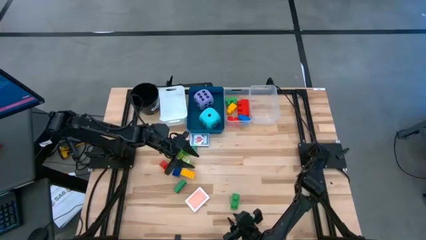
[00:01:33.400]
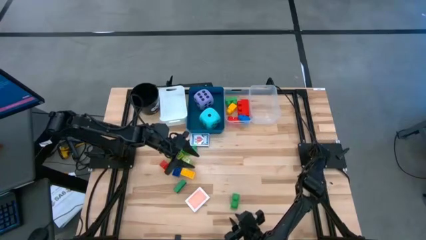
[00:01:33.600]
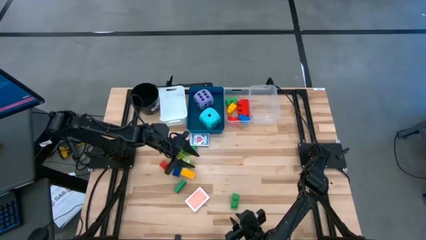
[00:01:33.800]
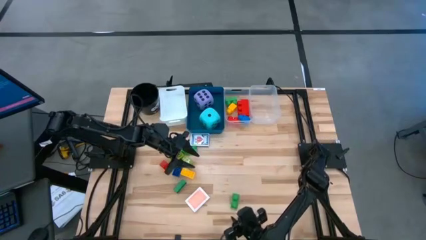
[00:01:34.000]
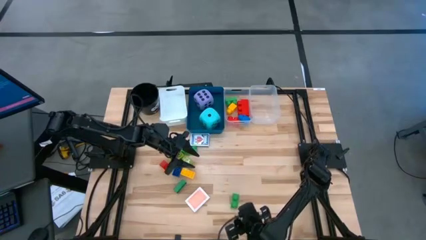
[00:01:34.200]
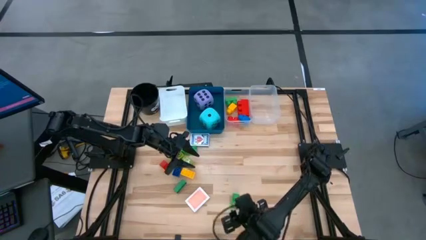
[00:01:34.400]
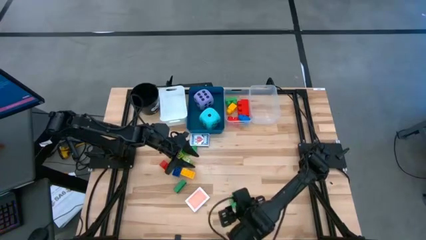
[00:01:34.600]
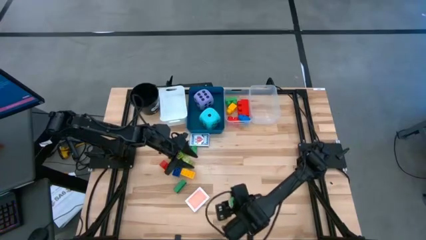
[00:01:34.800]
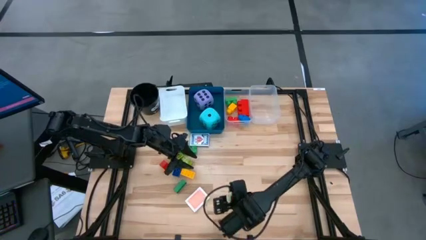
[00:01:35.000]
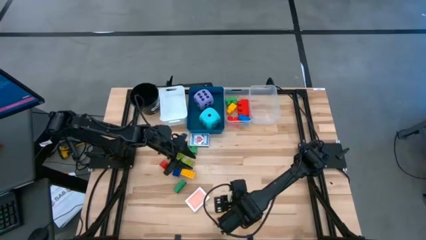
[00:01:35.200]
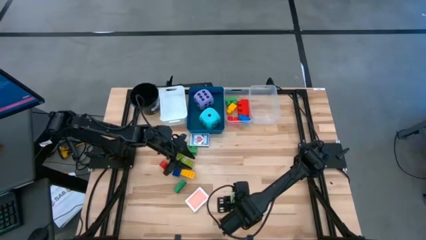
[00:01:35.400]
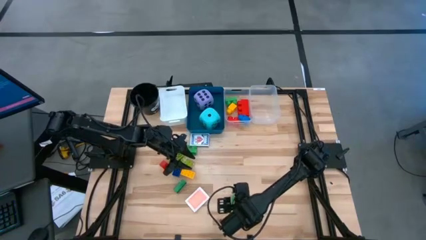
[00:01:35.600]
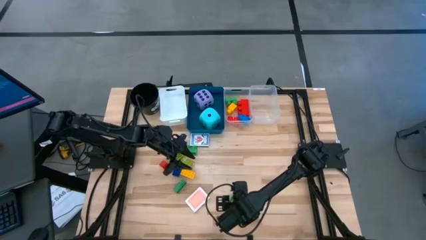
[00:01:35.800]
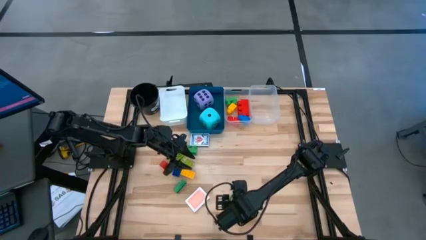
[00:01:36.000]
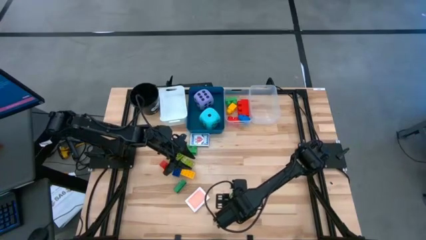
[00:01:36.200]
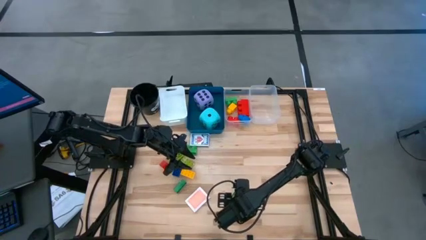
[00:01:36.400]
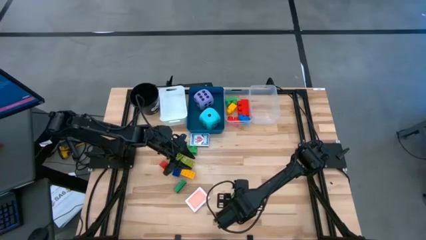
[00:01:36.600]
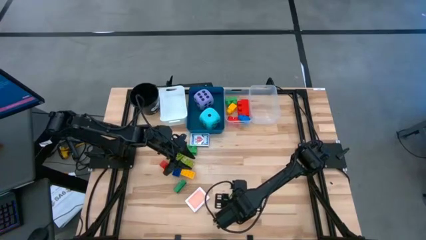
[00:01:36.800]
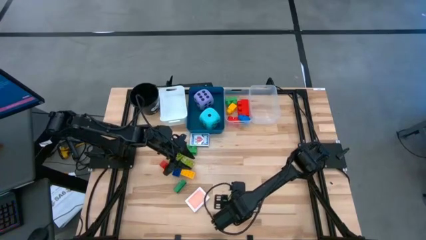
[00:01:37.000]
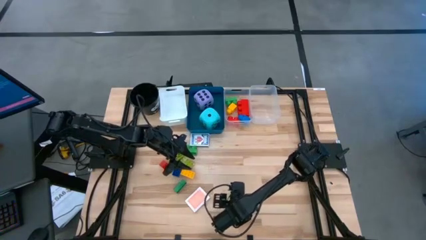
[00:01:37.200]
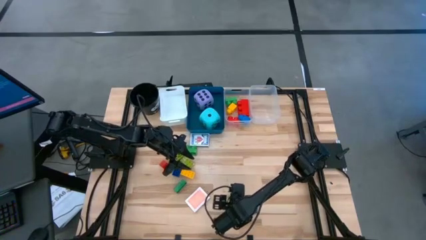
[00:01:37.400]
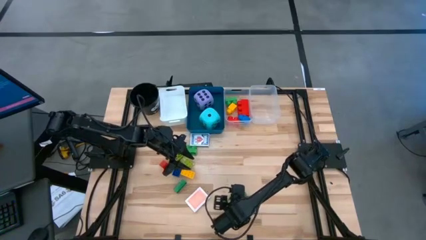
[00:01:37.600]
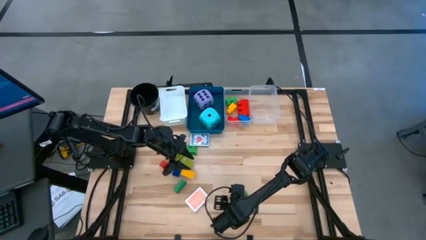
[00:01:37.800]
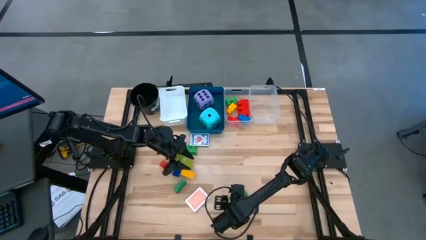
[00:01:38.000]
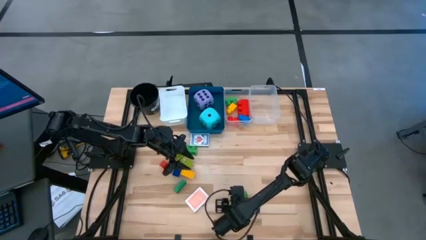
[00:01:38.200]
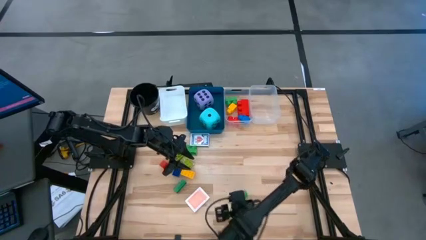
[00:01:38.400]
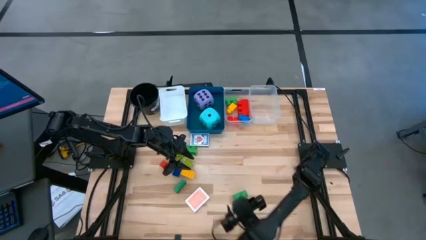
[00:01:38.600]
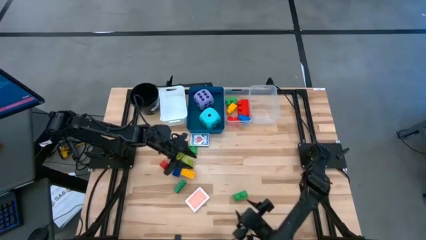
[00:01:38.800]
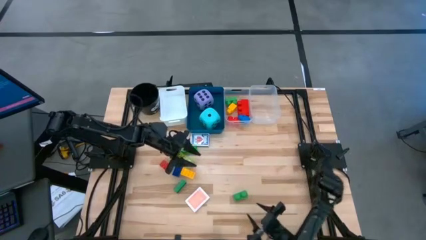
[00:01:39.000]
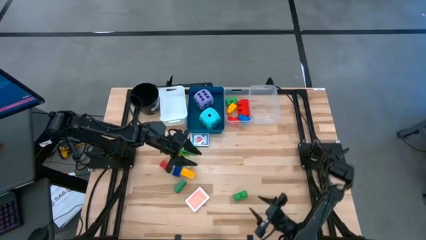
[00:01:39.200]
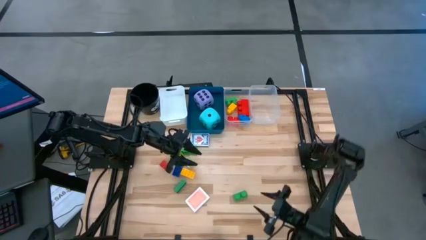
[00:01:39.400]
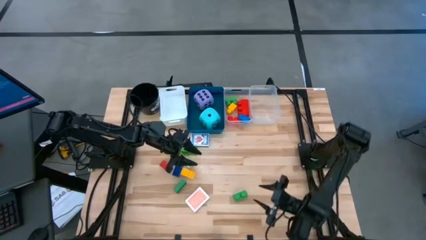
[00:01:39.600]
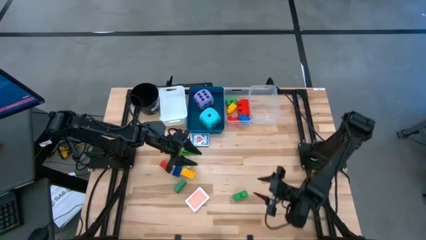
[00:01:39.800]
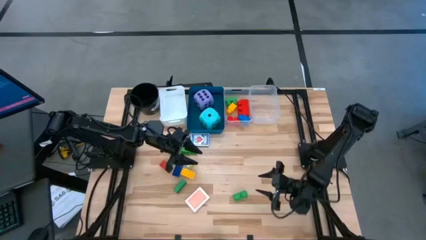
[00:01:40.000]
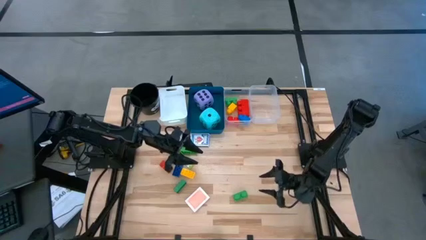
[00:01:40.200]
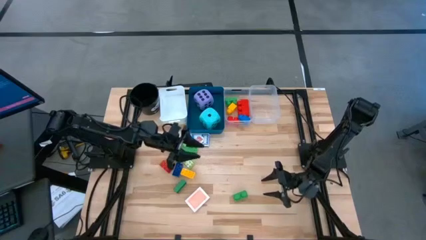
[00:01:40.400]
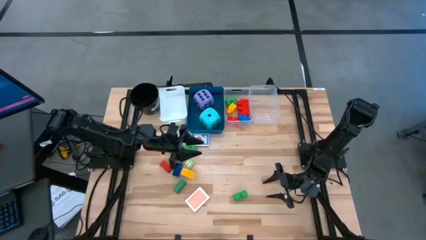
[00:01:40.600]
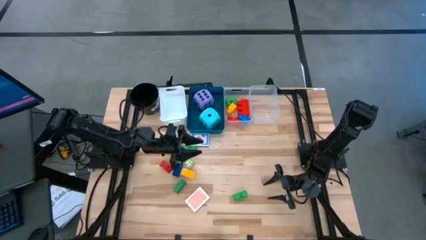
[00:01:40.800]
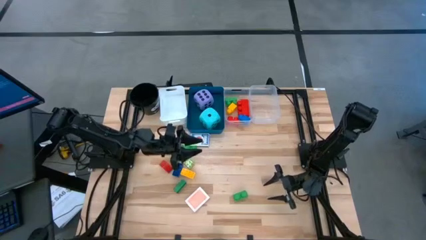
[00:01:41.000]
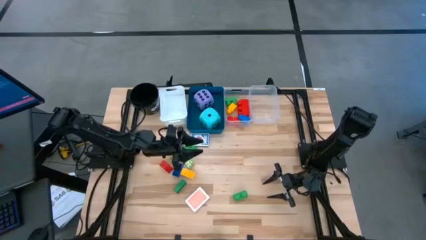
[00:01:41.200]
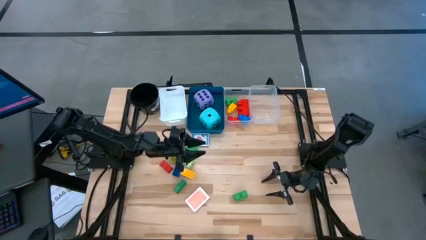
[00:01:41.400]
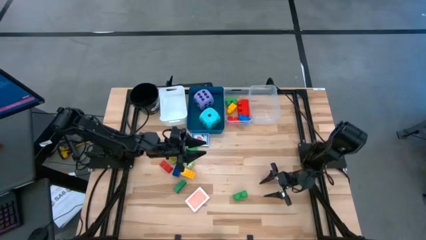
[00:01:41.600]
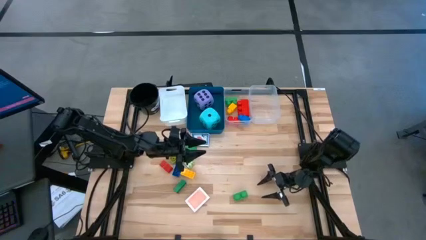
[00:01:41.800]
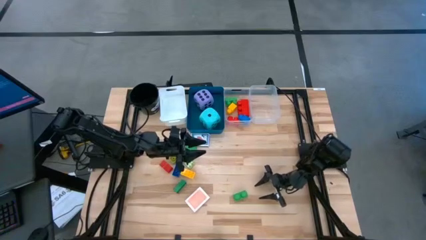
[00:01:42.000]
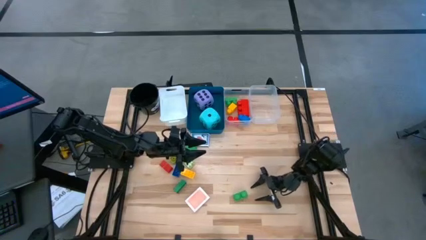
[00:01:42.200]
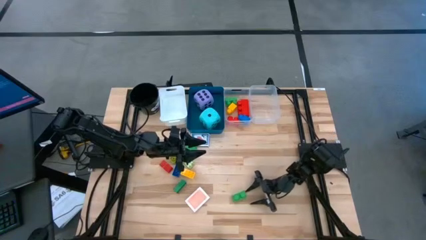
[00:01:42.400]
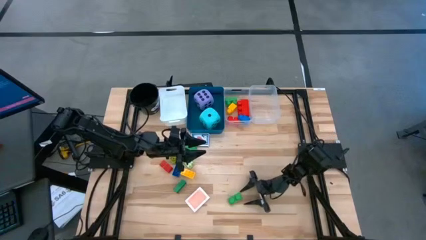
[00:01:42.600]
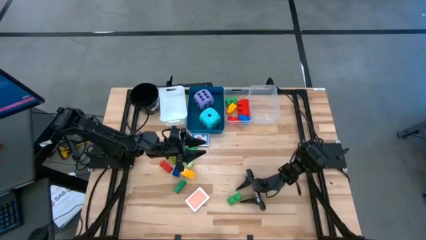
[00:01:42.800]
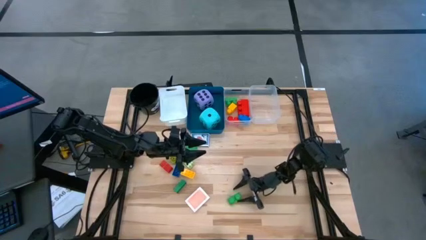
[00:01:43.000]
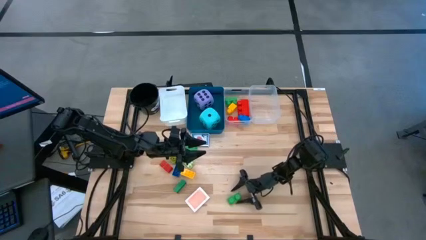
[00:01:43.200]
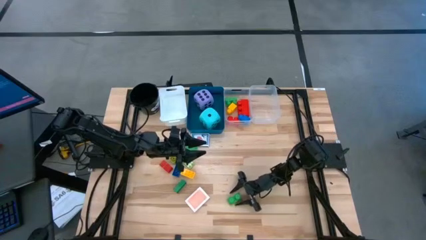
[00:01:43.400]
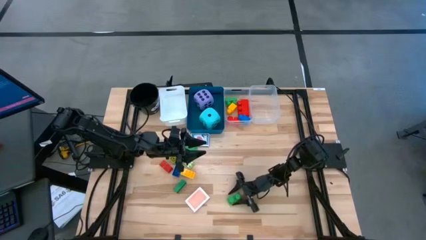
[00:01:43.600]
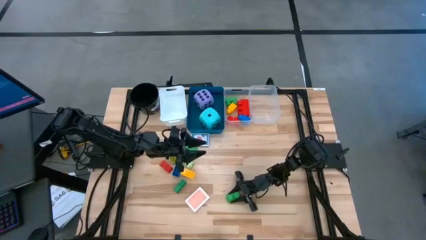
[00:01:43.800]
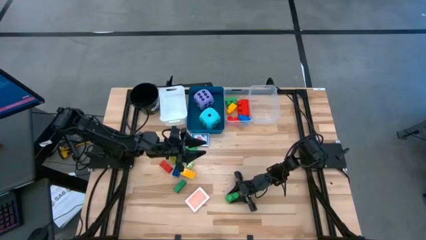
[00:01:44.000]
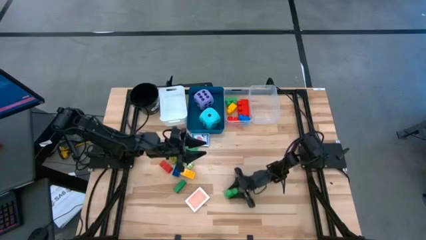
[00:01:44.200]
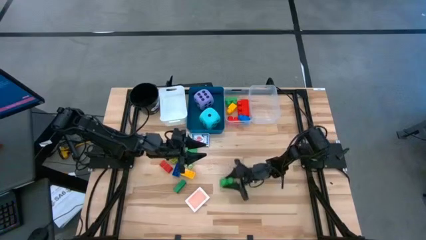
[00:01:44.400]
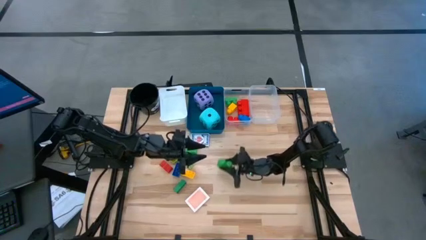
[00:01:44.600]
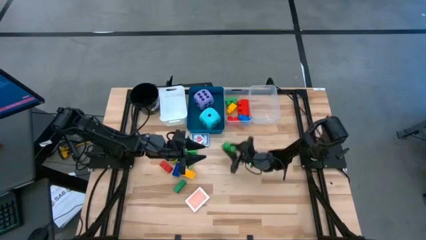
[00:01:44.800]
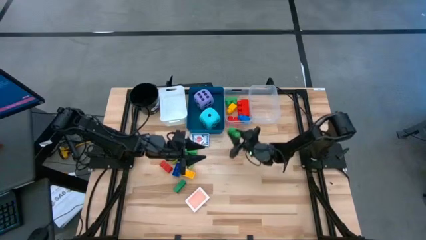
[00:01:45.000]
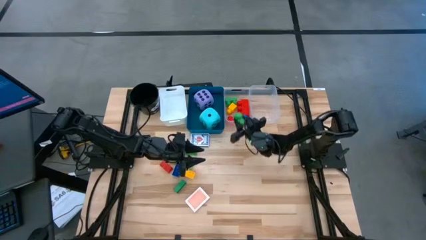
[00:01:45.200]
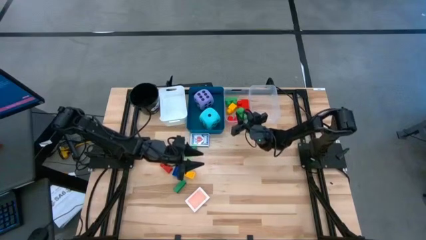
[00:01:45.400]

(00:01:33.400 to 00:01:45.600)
Task: Pick & Place Toys
Put the green 2 stud game piece into the left transparent bin

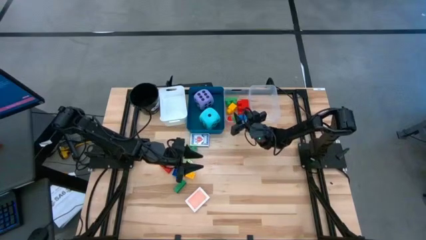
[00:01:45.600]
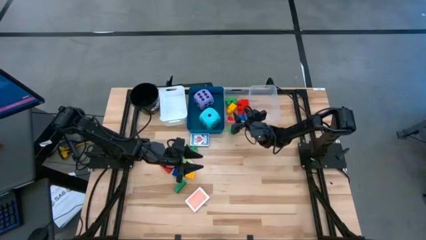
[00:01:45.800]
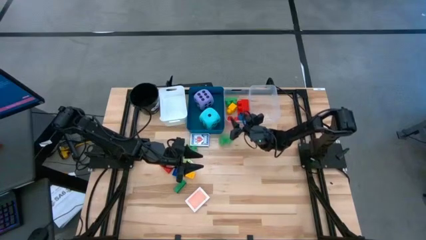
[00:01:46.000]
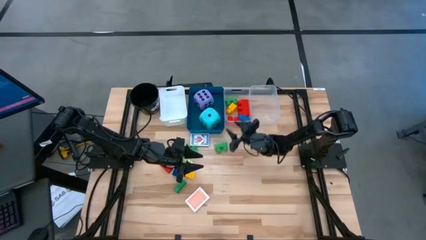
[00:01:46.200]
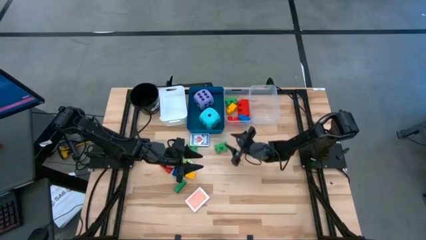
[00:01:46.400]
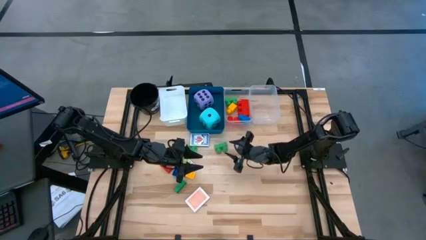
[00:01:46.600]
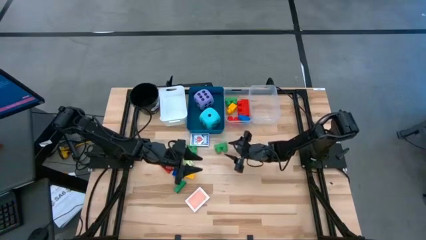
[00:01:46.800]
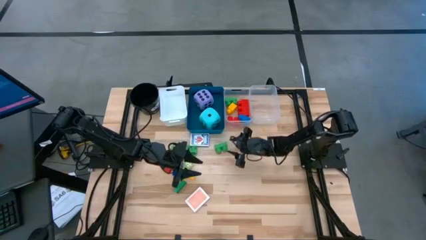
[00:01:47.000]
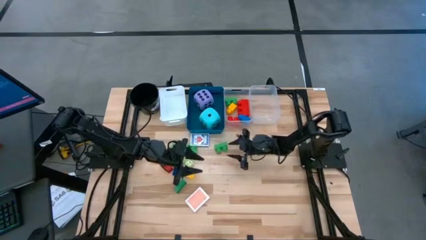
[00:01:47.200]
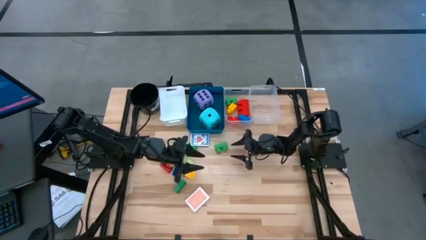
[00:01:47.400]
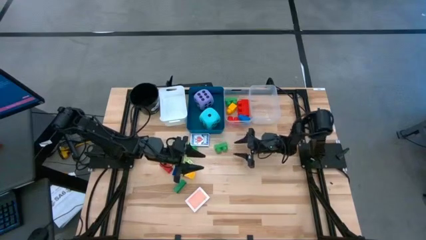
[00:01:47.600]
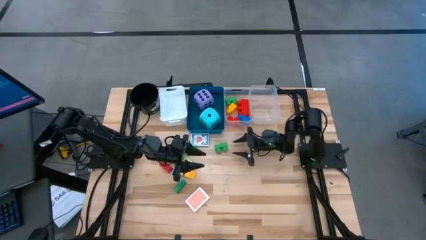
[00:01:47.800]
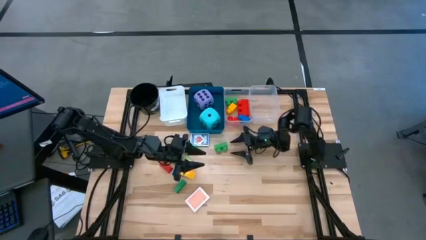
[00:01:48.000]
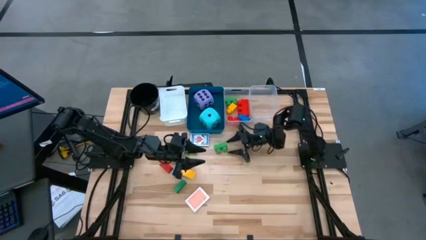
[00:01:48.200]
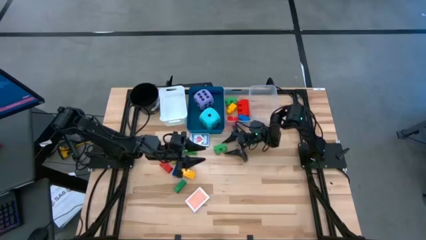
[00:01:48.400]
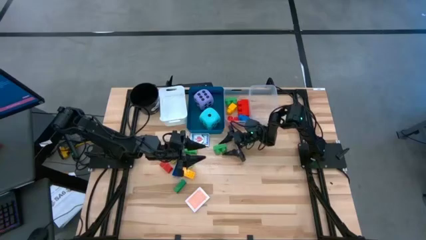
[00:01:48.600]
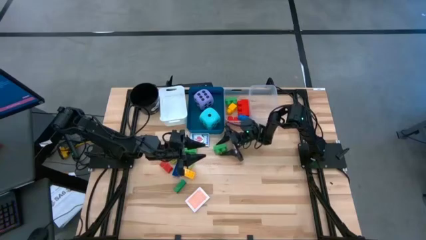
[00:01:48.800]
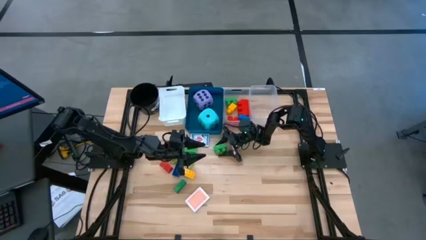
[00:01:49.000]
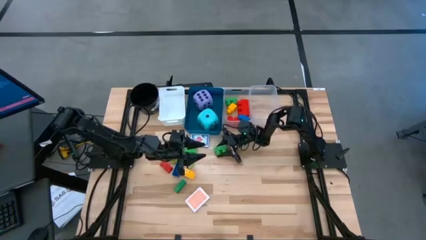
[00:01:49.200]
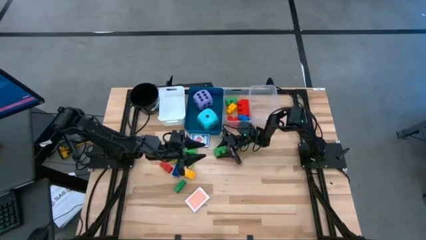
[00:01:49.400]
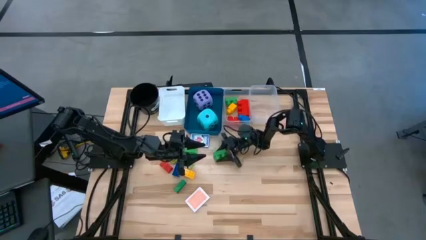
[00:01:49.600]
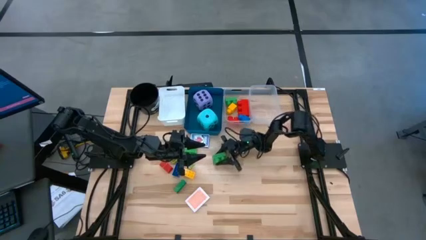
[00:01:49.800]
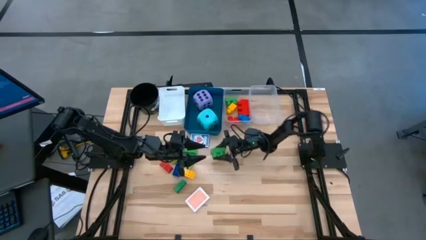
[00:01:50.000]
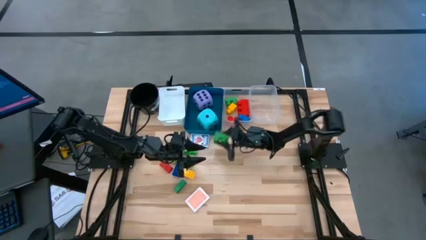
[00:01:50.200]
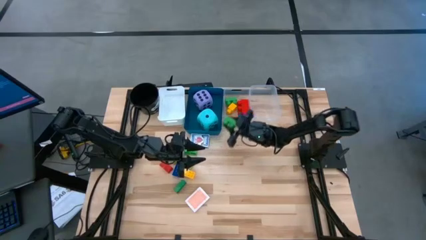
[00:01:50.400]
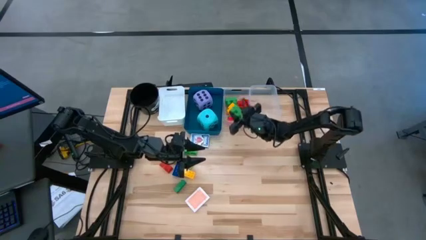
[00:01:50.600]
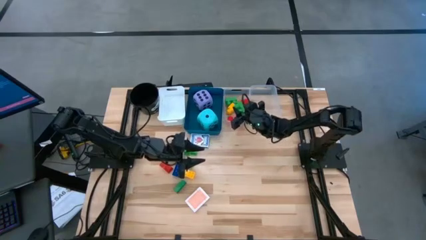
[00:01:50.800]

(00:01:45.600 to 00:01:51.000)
Put the green 2 stud game piece into the left transparent bin
